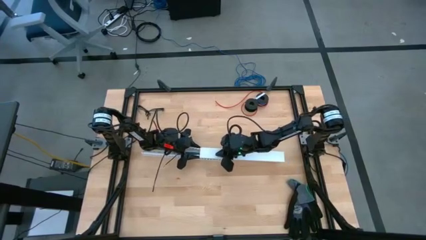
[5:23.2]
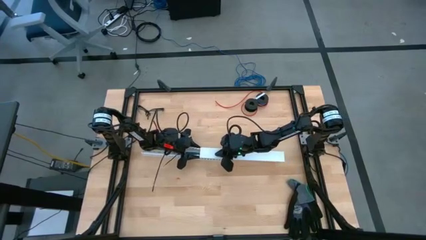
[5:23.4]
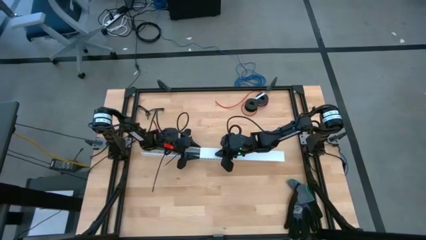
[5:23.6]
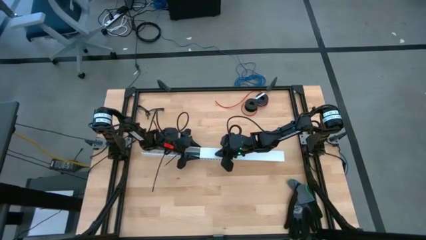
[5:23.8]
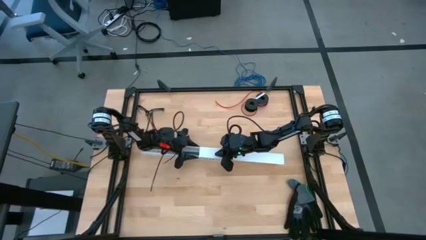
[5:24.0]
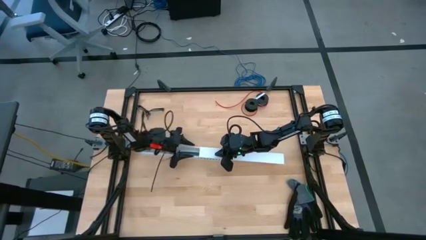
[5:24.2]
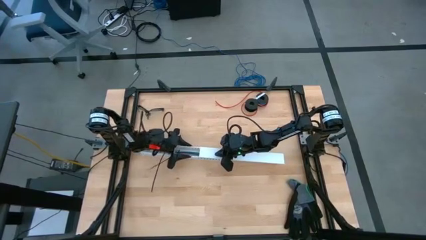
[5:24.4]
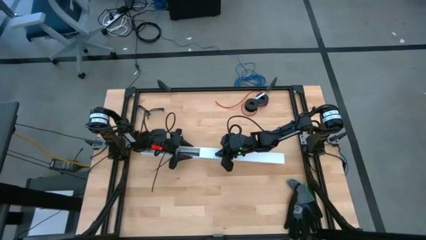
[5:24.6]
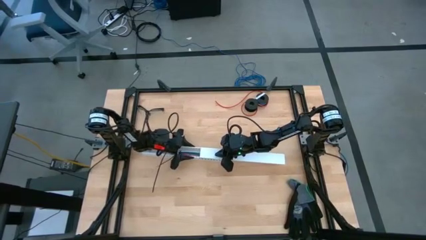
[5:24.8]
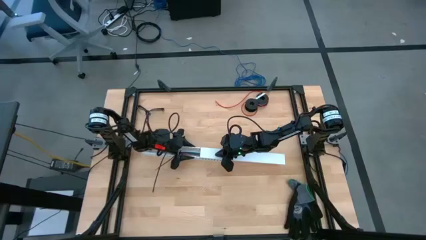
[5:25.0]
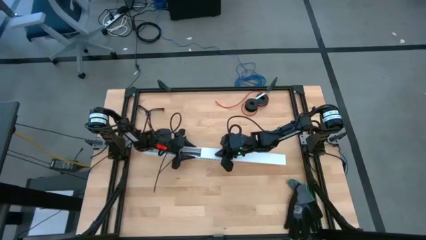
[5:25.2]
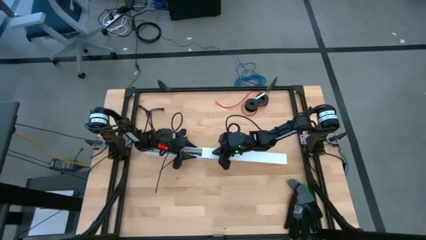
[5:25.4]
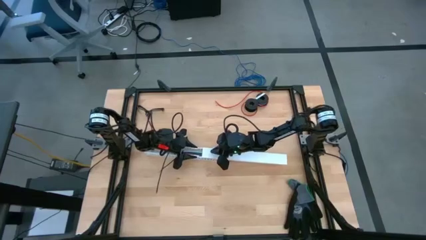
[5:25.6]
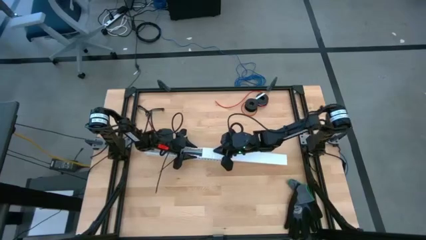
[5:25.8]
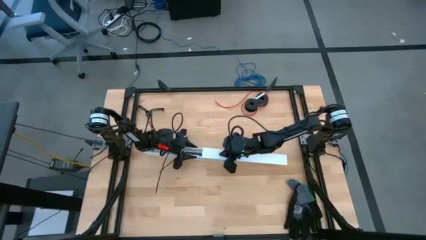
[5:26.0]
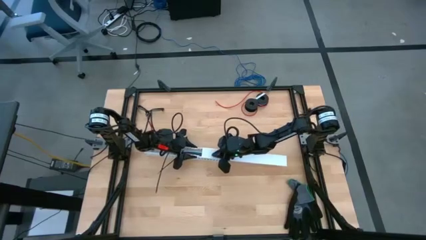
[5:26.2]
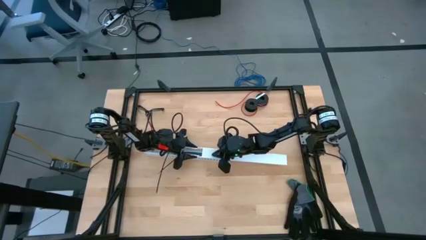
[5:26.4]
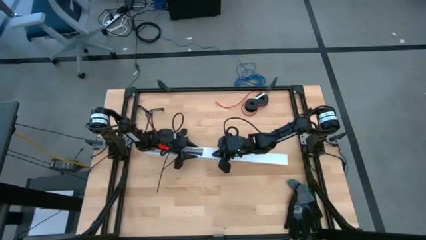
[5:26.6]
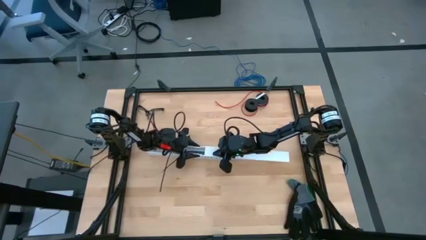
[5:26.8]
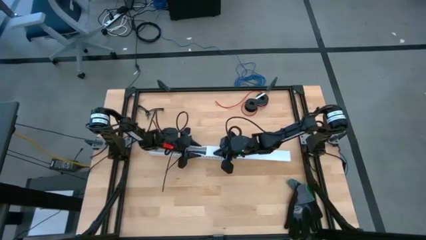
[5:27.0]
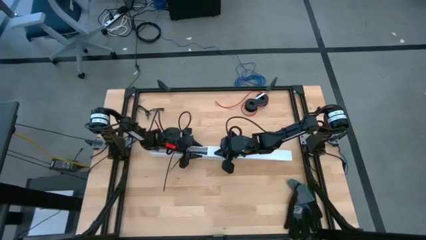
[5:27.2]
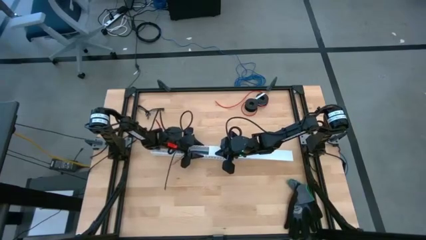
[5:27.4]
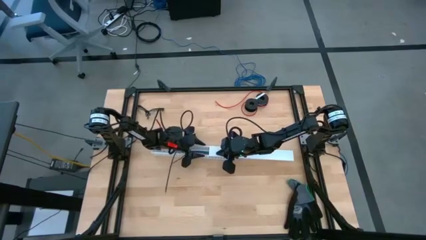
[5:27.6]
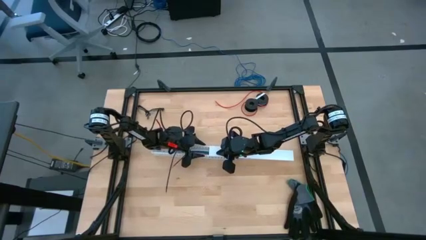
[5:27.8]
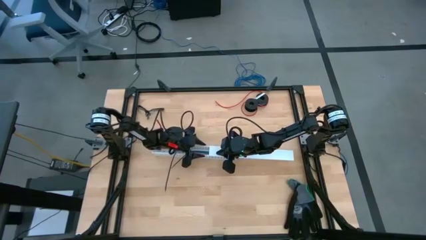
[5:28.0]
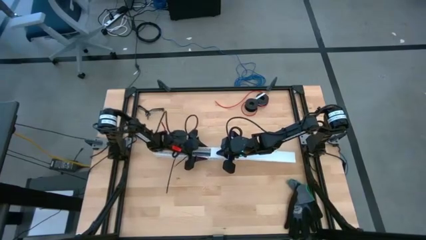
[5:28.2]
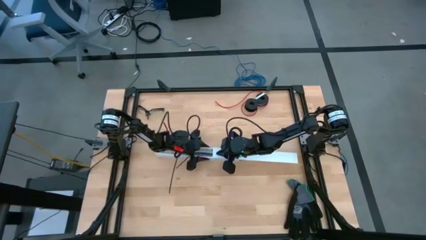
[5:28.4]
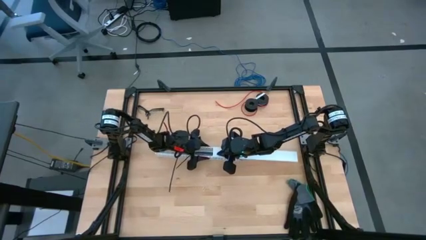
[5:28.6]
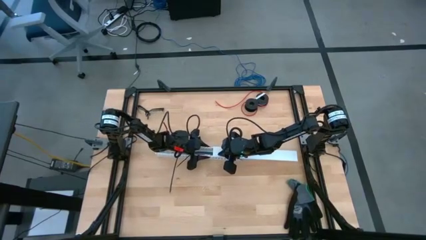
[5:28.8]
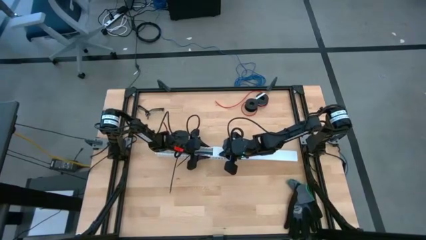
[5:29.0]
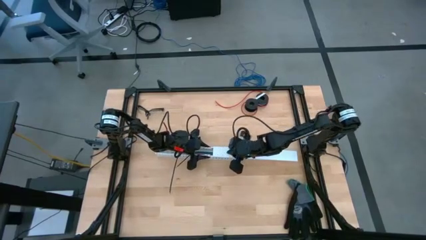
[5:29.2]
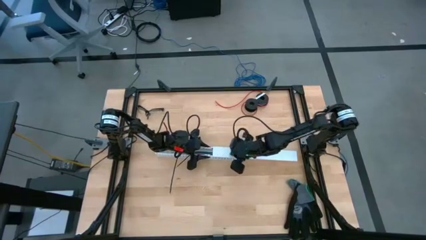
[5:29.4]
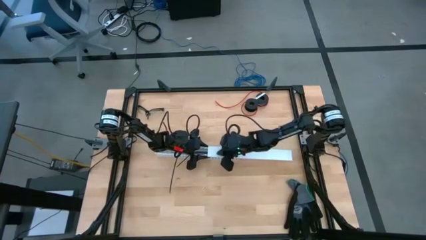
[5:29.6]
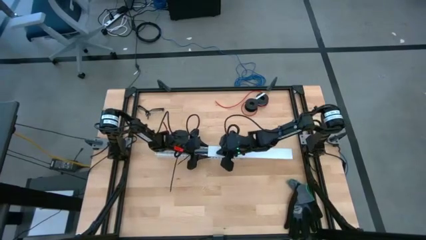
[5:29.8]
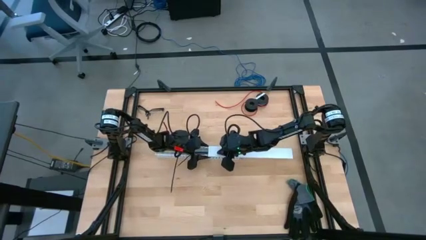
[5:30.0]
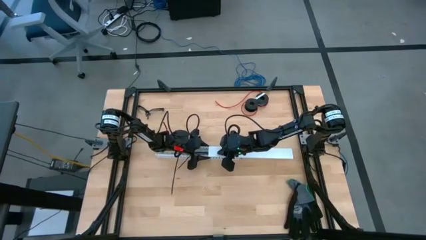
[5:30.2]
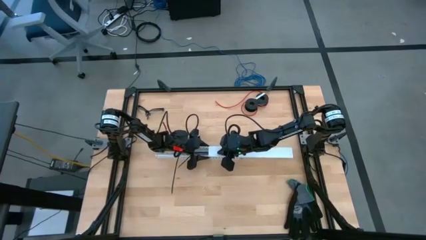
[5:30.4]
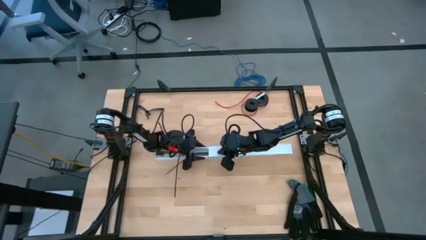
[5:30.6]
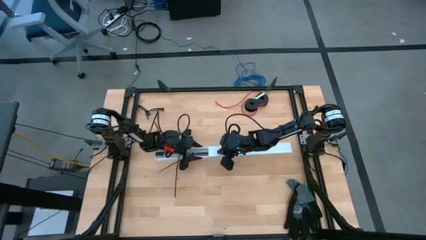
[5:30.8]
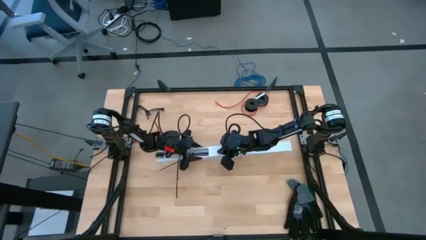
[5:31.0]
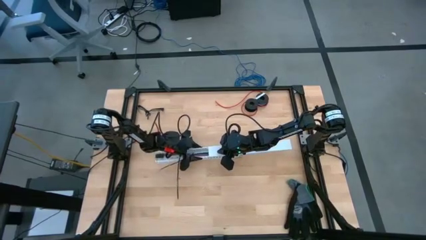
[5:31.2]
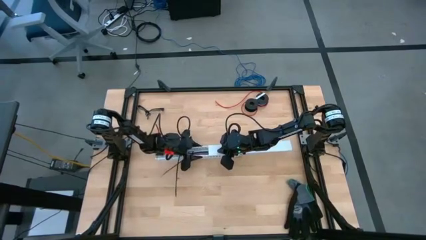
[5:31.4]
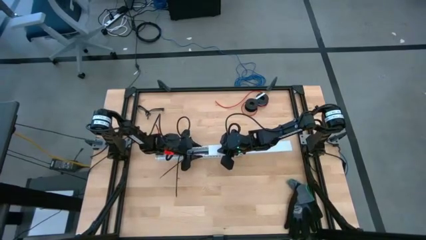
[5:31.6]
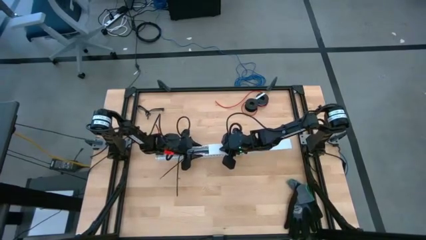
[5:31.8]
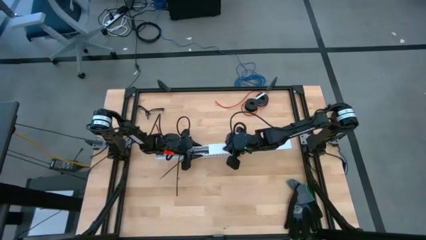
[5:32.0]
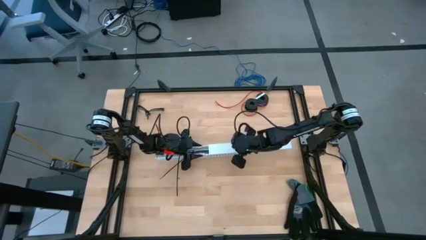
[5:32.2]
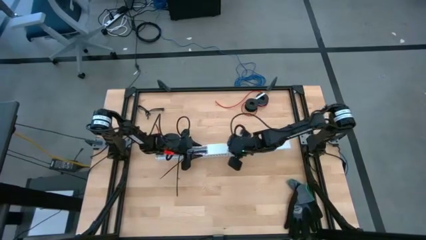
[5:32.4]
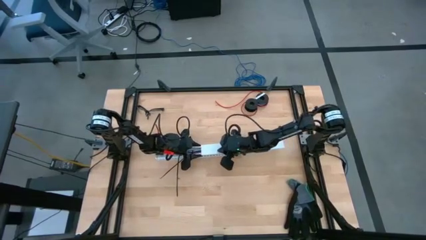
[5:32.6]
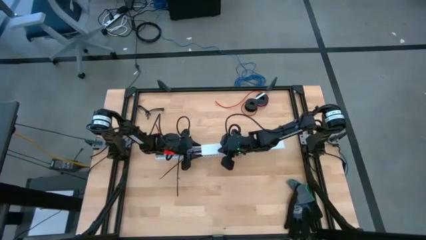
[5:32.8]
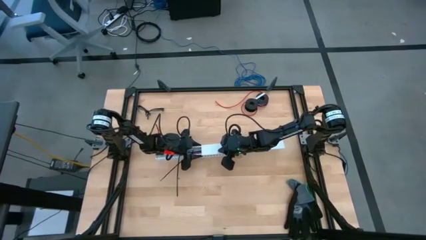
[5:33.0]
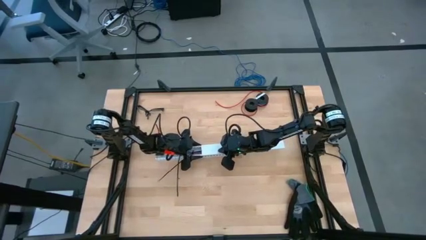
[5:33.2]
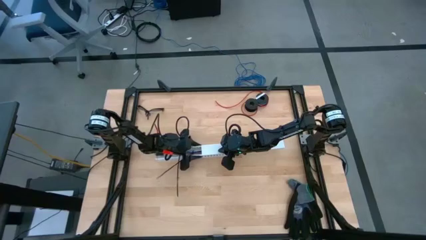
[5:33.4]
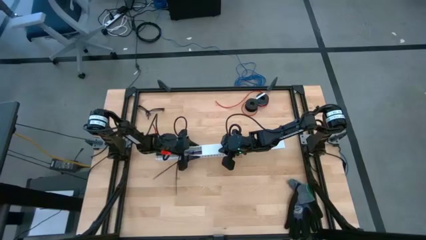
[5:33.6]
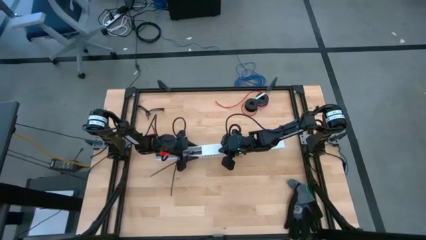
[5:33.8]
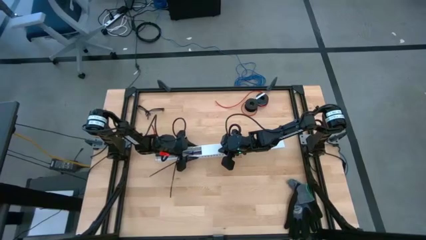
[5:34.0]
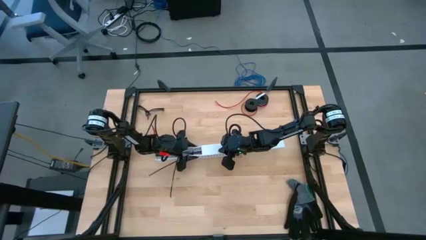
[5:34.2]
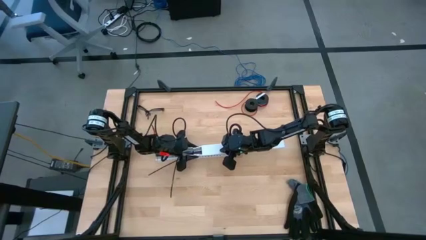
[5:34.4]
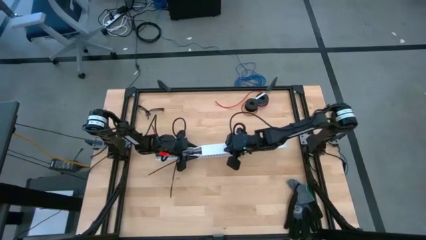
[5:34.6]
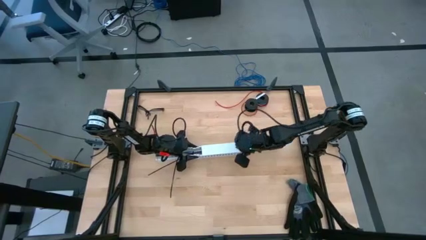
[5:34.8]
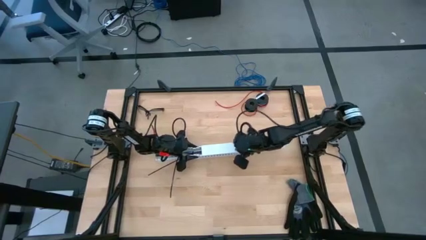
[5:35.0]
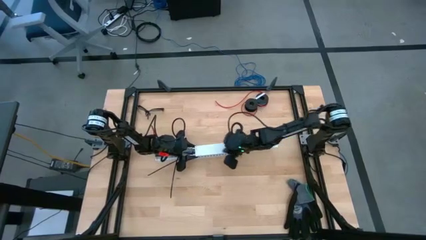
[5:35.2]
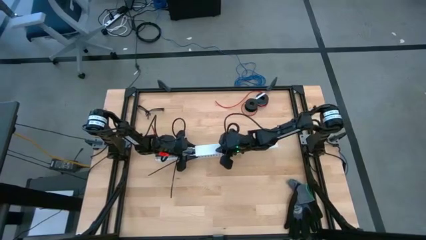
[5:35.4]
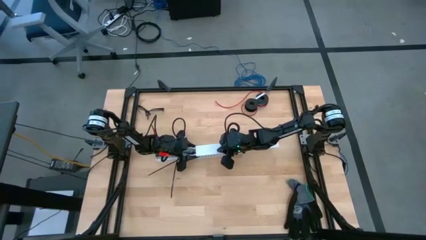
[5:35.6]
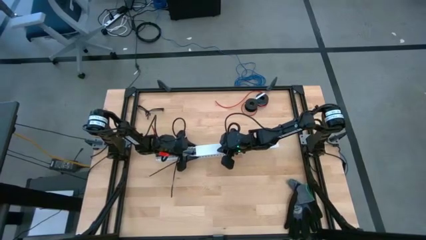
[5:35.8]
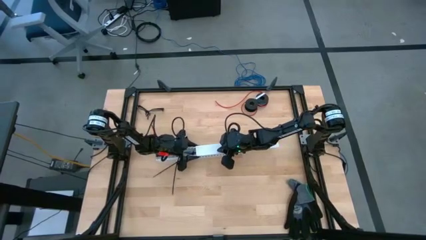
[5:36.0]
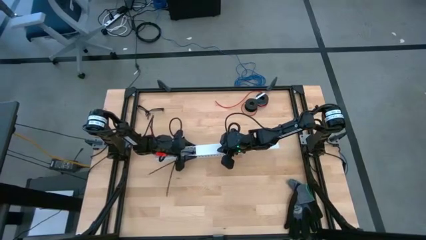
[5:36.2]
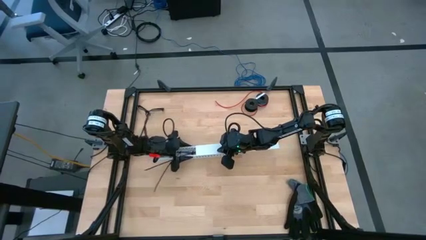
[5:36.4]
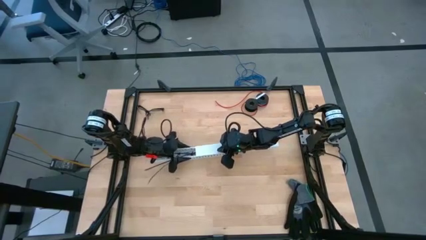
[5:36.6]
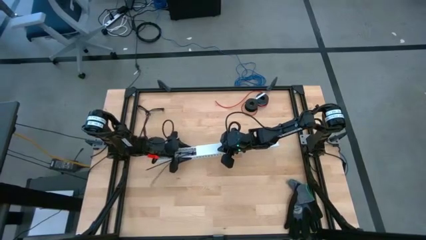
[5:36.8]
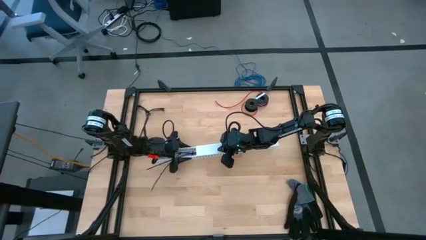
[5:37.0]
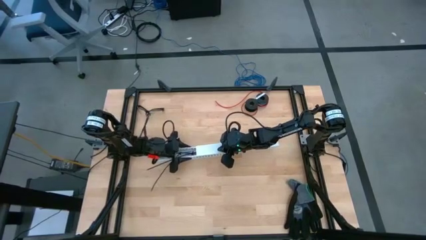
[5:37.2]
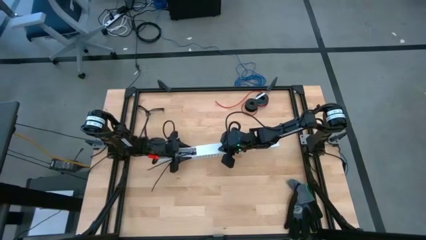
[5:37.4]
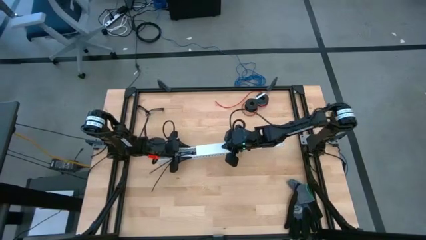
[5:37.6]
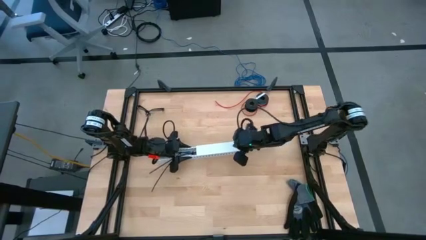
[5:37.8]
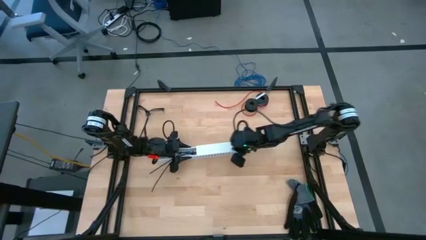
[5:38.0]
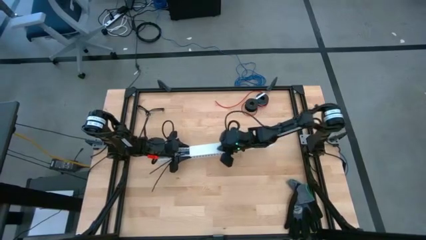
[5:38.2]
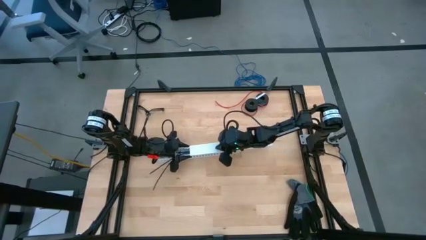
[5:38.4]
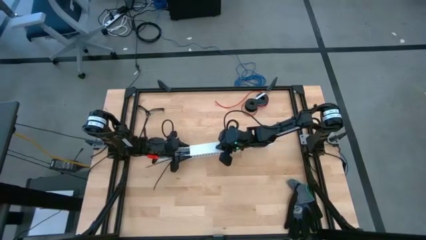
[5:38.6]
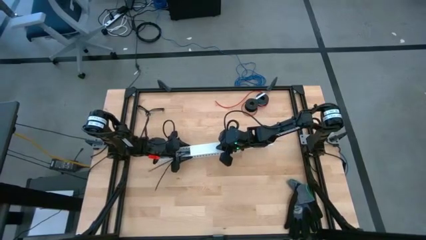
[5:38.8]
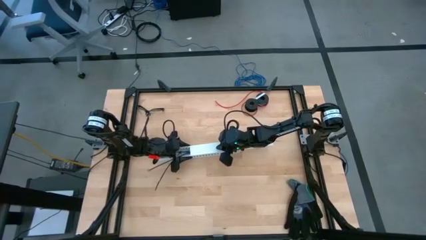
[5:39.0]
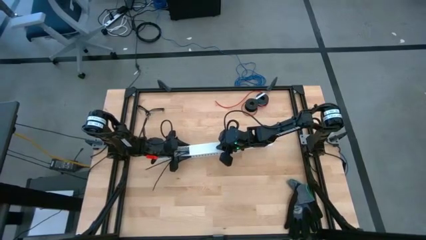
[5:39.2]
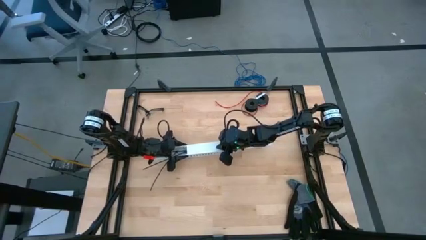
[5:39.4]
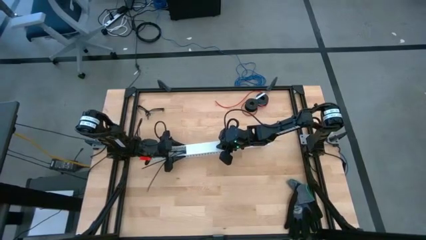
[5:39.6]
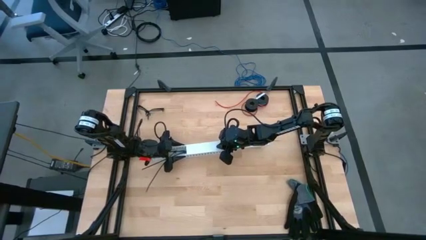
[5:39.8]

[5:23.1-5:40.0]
Task: Ziptie cables
Close the white cable duct
